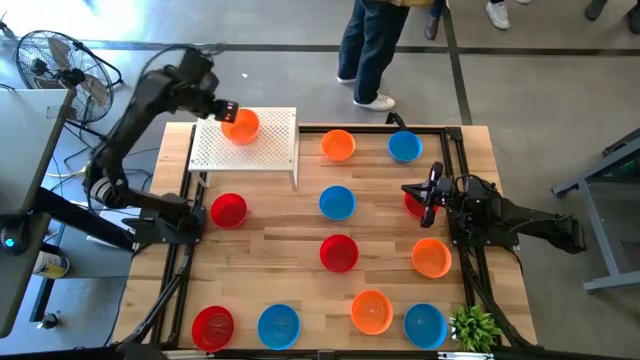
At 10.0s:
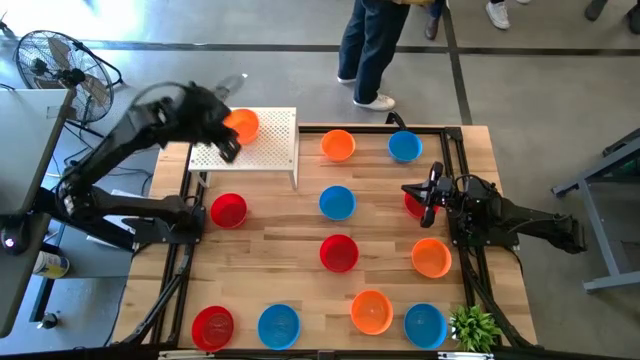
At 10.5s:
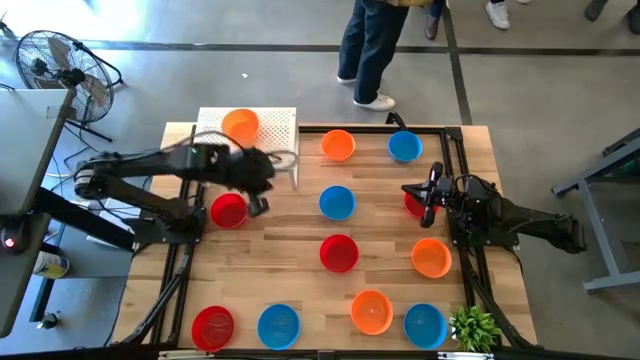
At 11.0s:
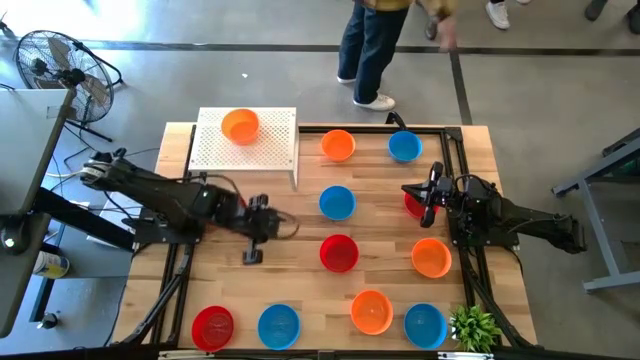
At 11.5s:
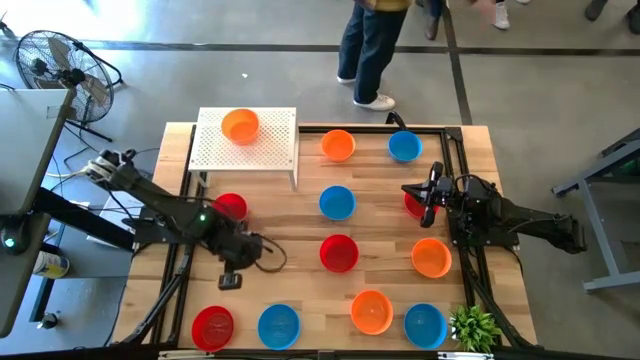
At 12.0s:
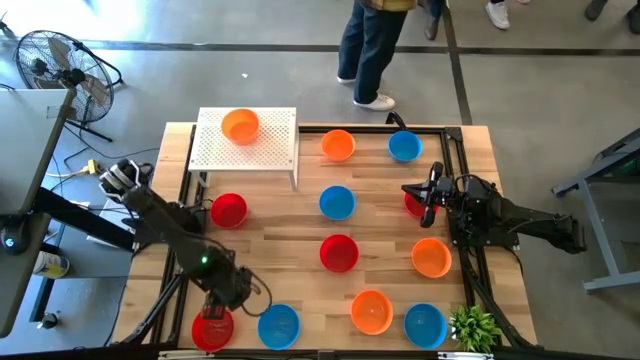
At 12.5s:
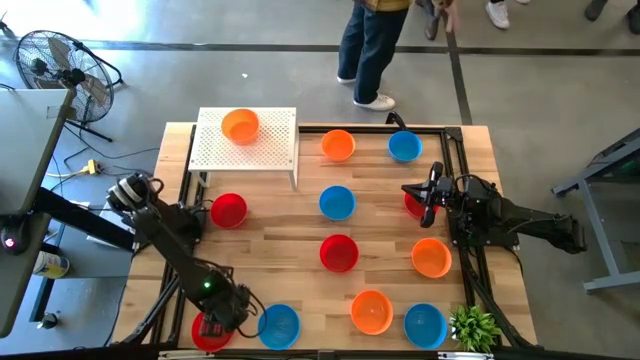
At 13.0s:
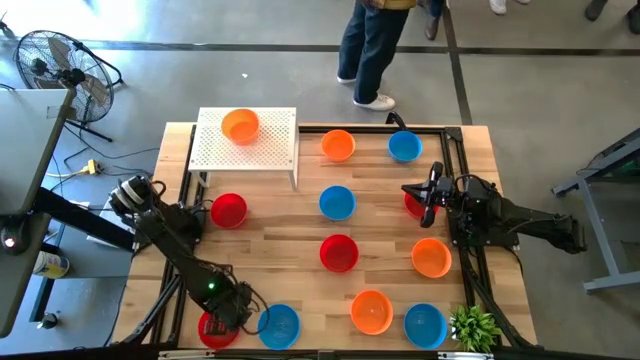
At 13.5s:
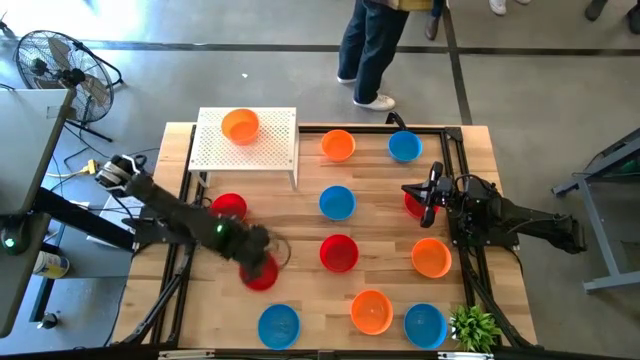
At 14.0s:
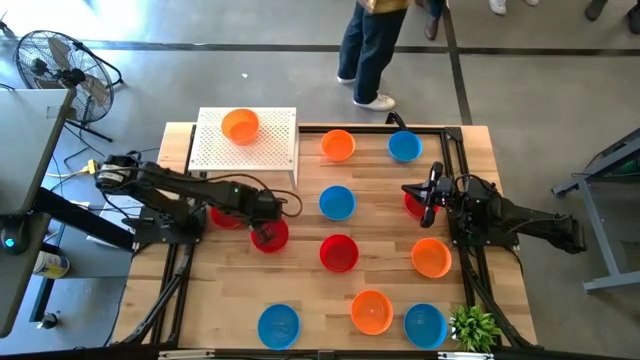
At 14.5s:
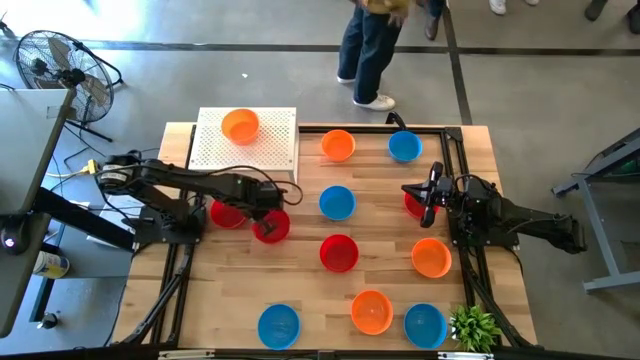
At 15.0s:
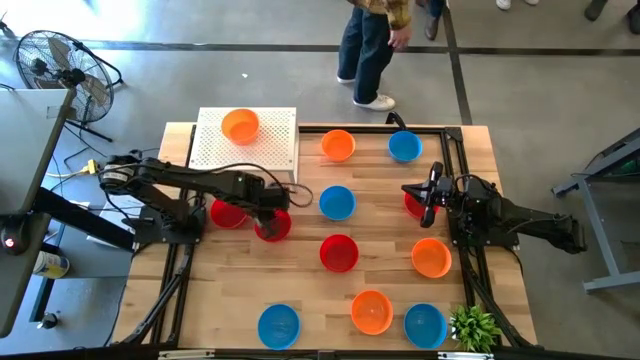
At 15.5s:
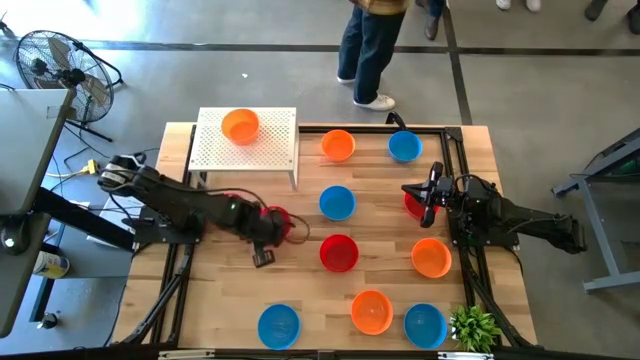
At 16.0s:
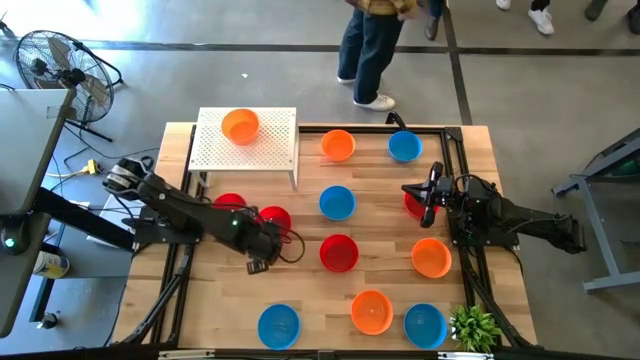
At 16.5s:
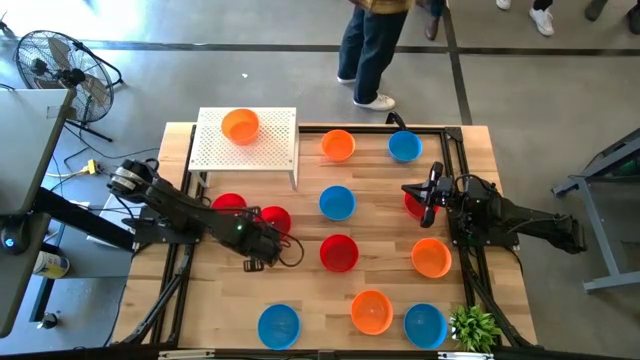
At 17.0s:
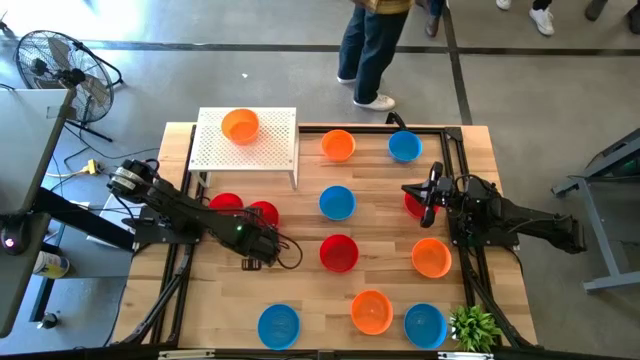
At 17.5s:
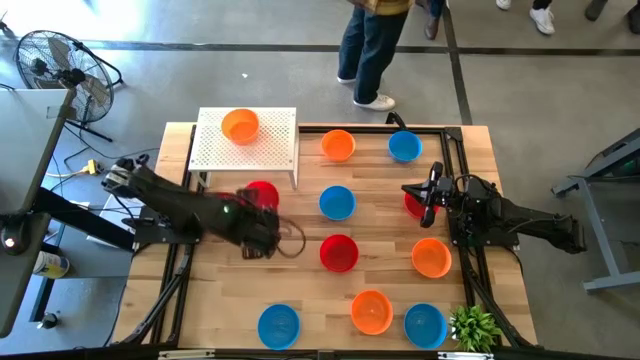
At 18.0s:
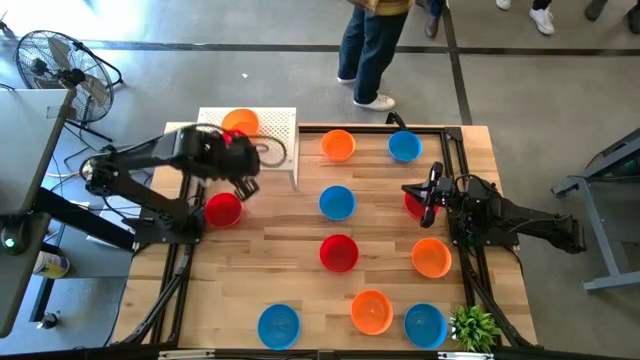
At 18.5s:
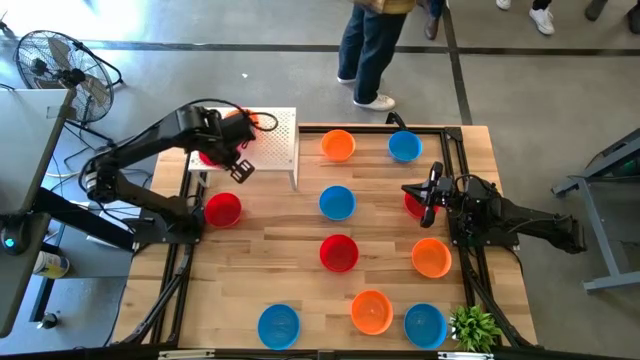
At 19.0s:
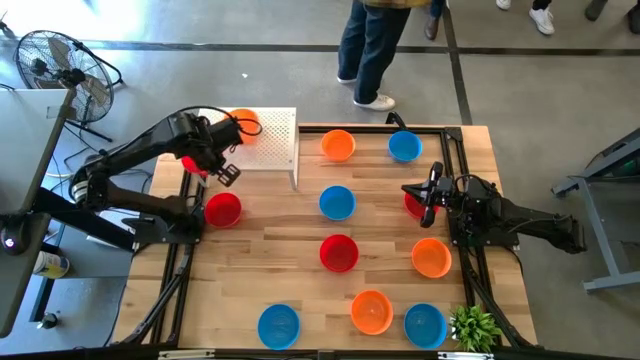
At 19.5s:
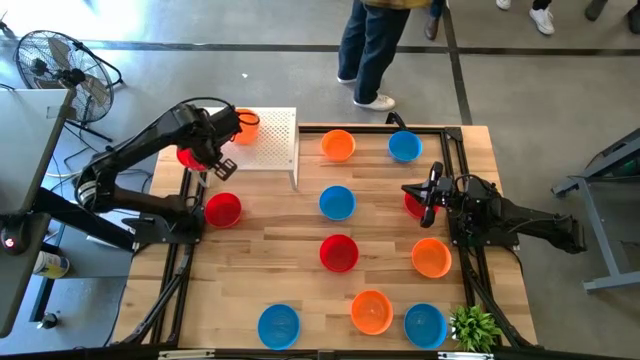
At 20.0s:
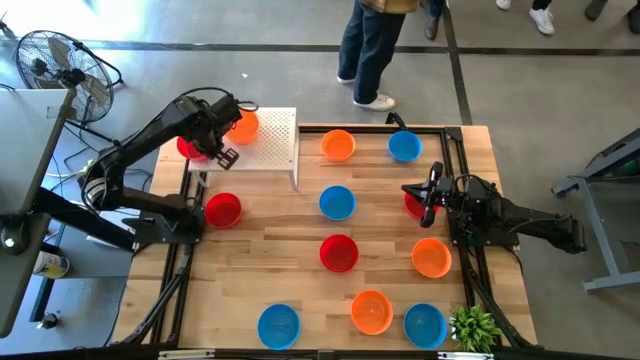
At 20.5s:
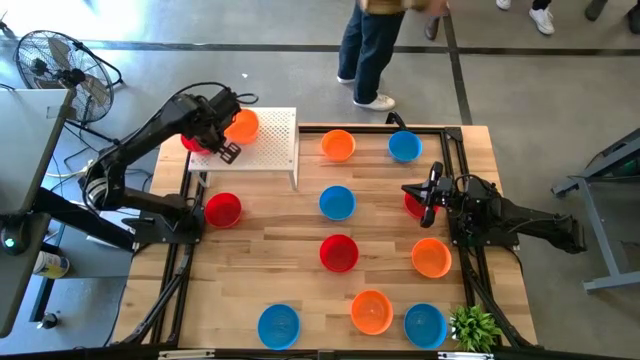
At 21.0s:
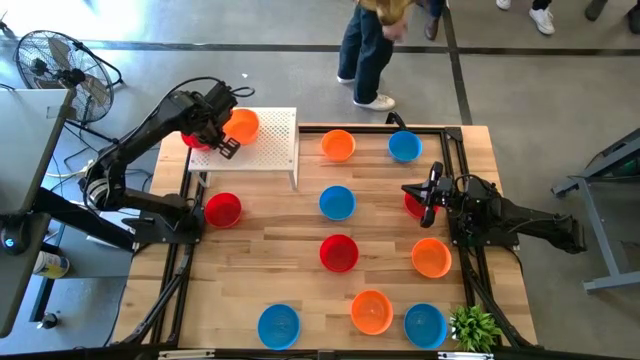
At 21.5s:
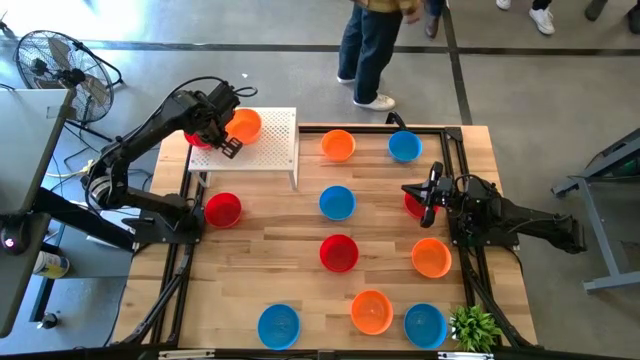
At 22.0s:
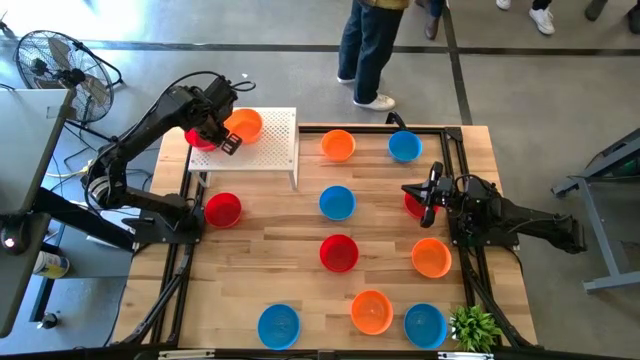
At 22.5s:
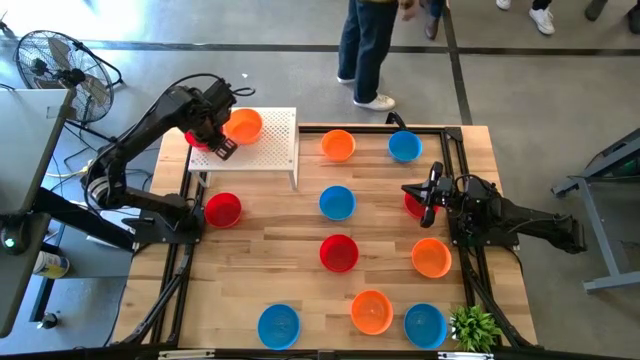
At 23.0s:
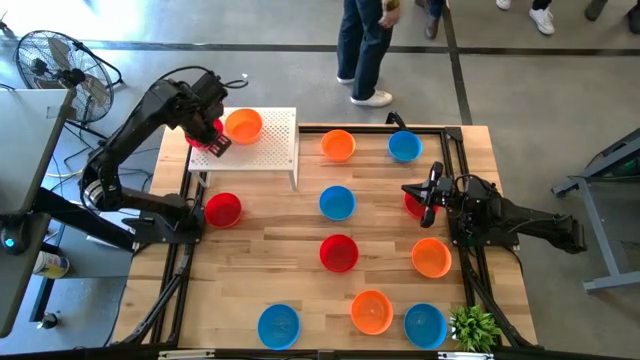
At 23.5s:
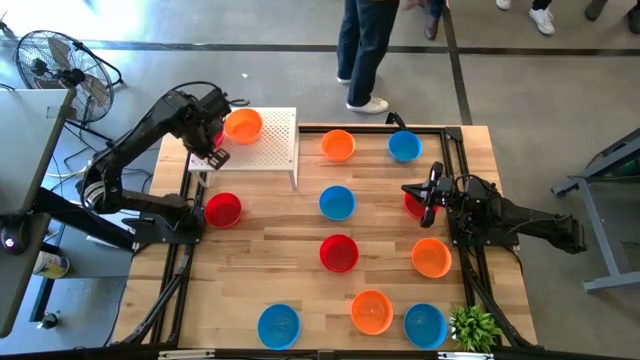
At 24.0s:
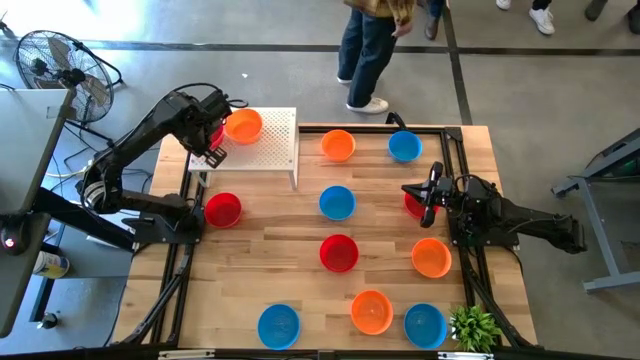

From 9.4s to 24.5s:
Task: Pick & Place Mini bowls
Put the red bowl on the shelf

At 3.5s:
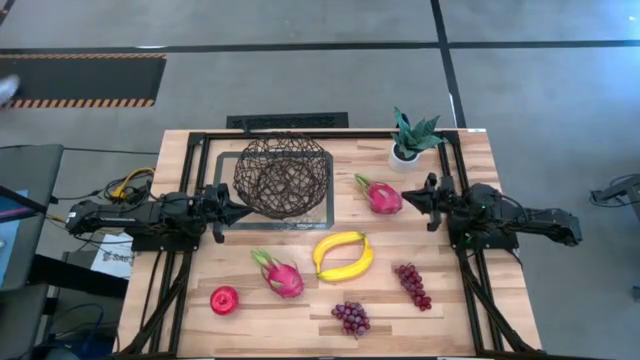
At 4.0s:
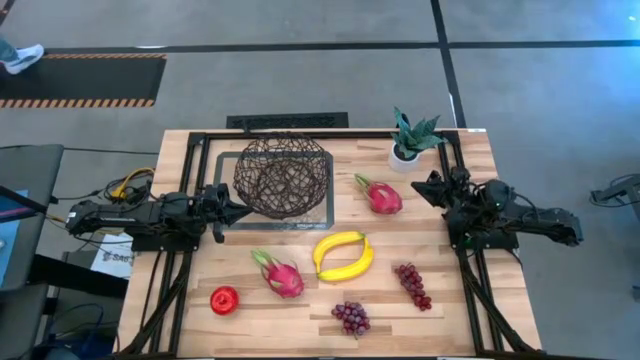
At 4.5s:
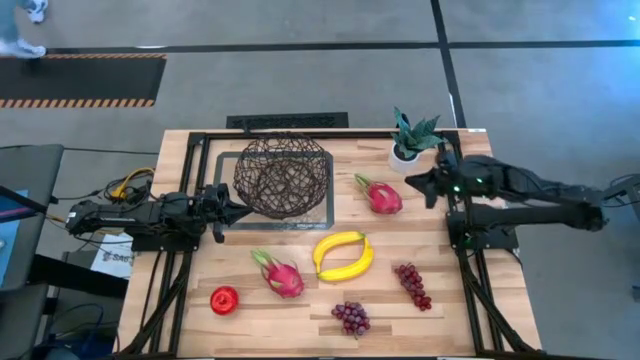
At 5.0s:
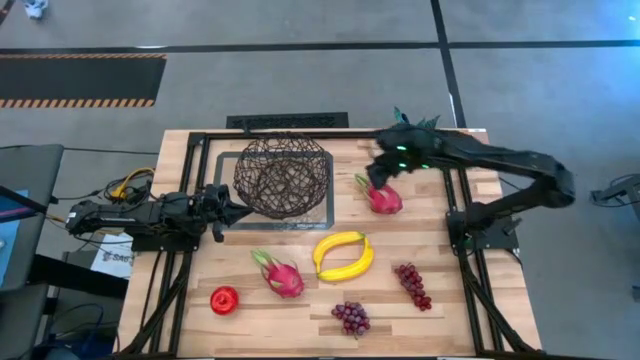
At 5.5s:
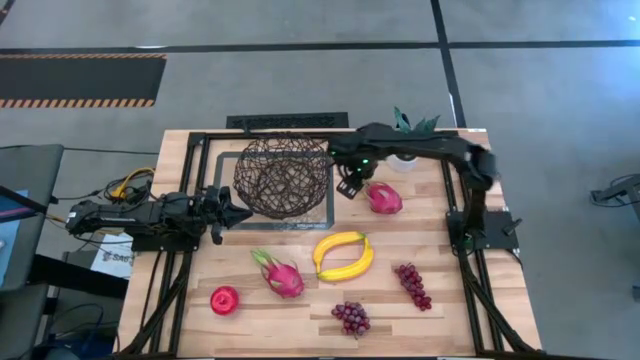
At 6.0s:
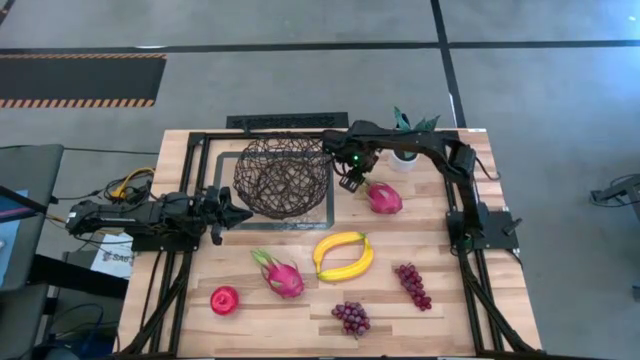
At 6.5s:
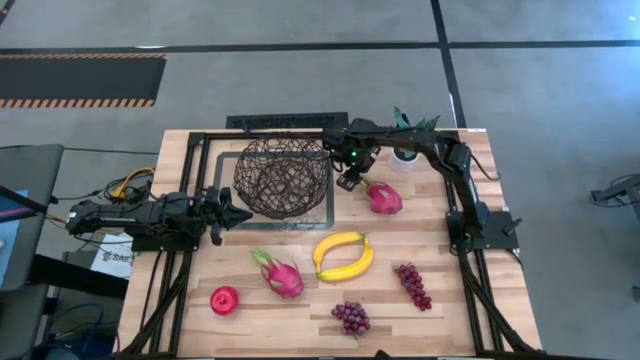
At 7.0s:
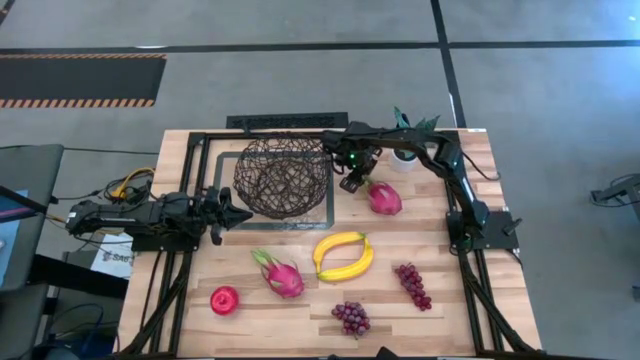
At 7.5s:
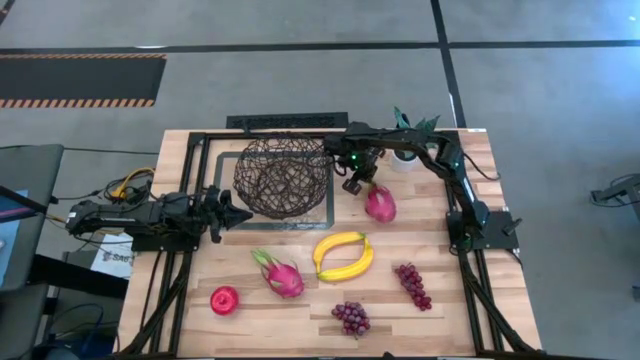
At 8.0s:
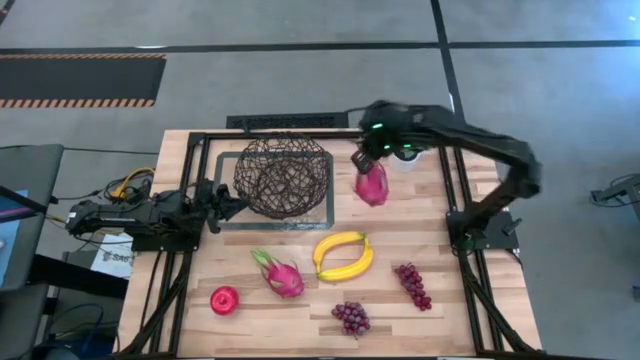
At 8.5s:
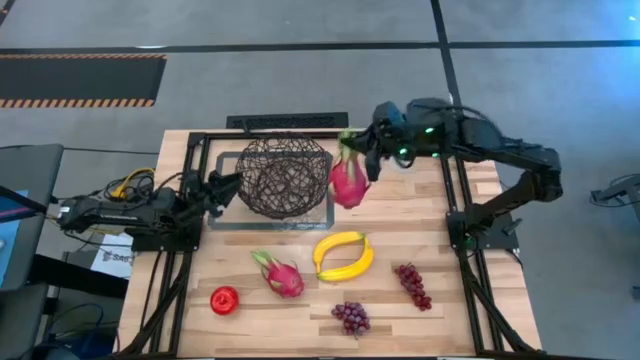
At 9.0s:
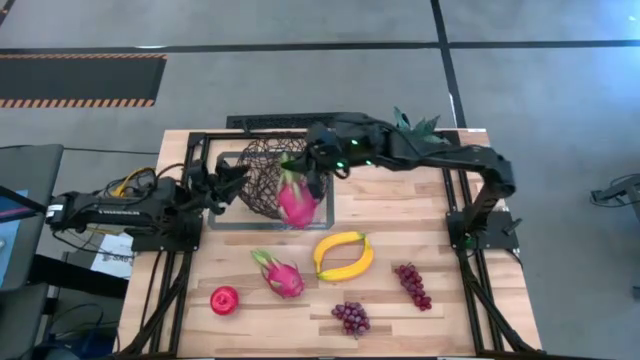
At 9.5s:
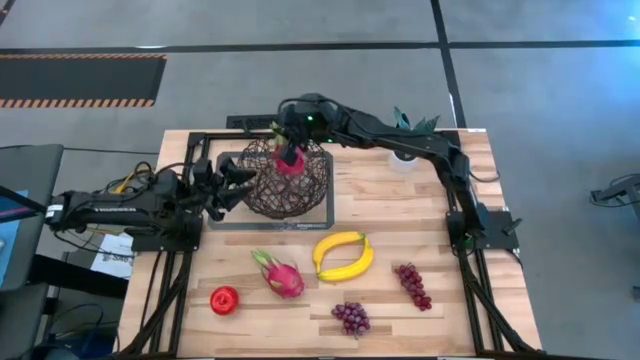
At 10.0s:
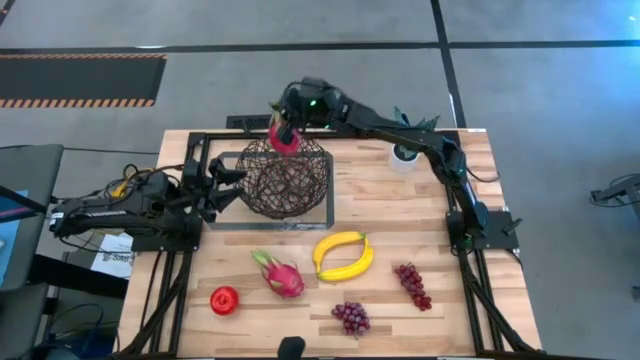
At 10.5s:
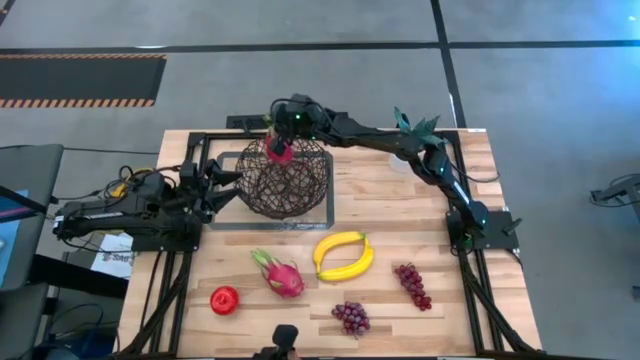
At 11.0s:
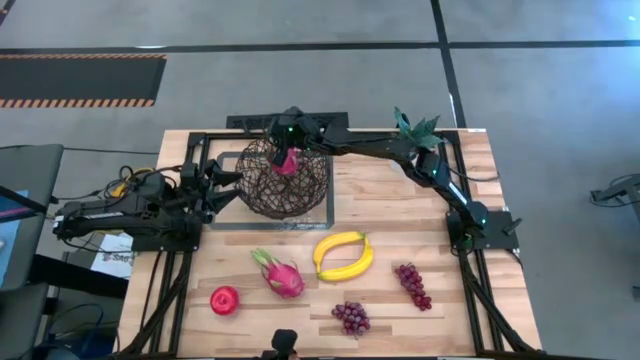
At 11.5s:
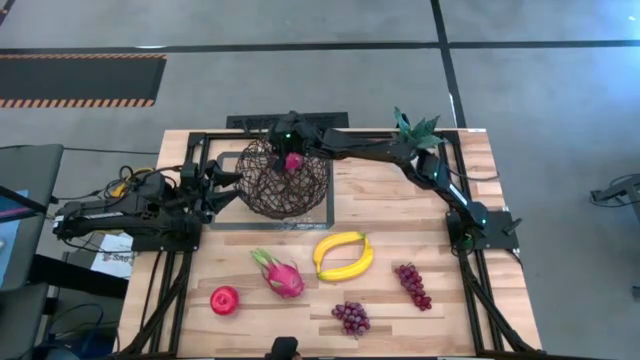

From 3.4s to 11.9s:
Task: Build produce basket
Put the top pink dragonfruit into the black wire basket
